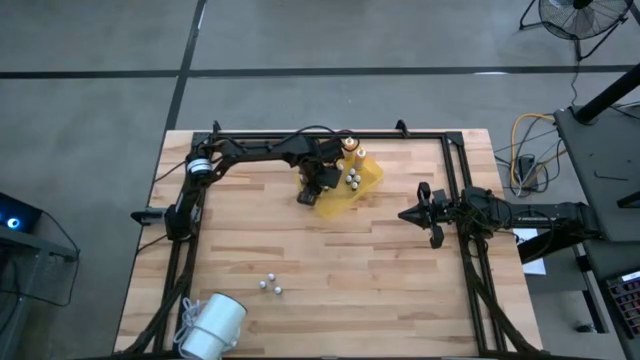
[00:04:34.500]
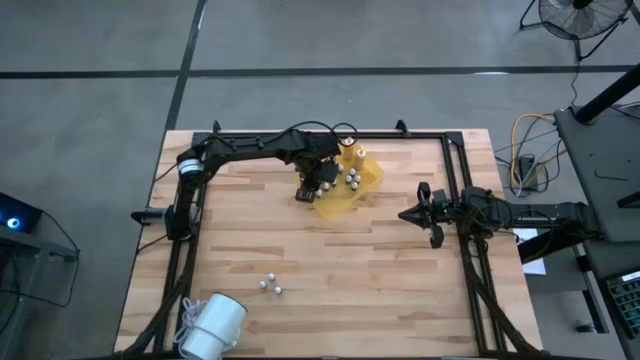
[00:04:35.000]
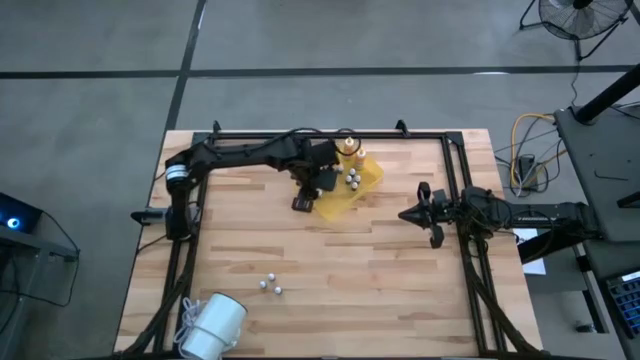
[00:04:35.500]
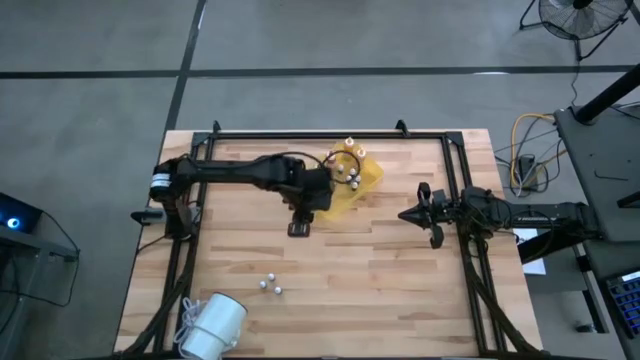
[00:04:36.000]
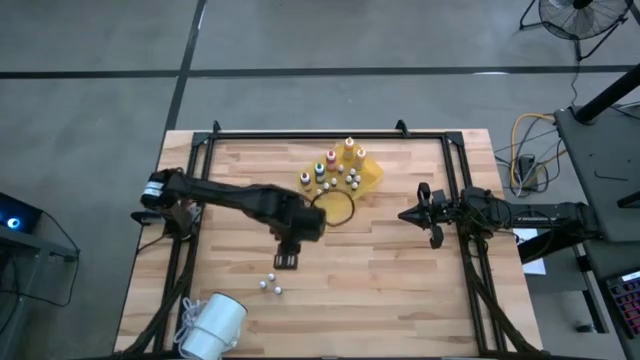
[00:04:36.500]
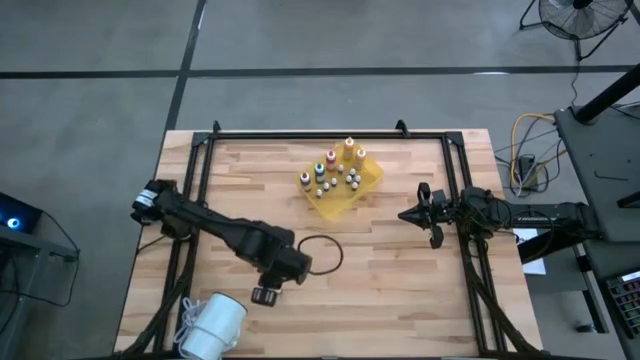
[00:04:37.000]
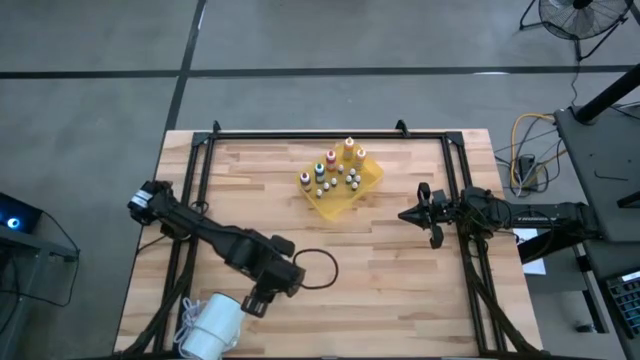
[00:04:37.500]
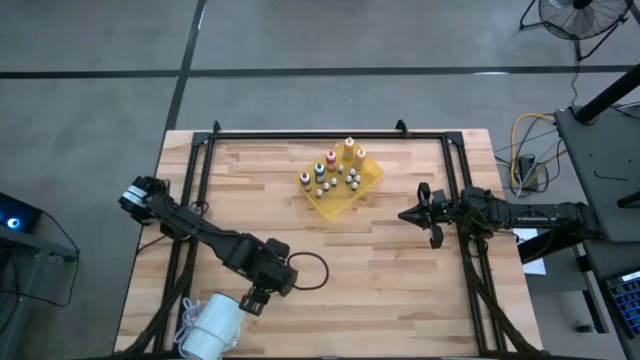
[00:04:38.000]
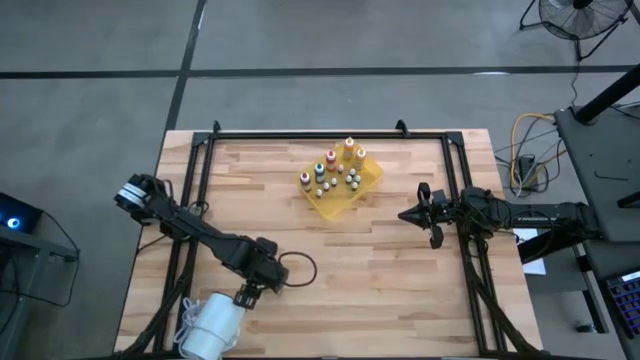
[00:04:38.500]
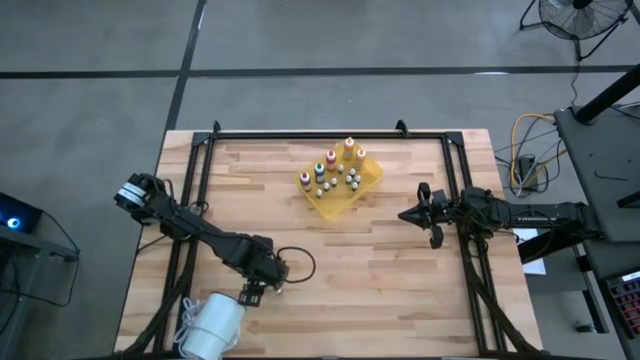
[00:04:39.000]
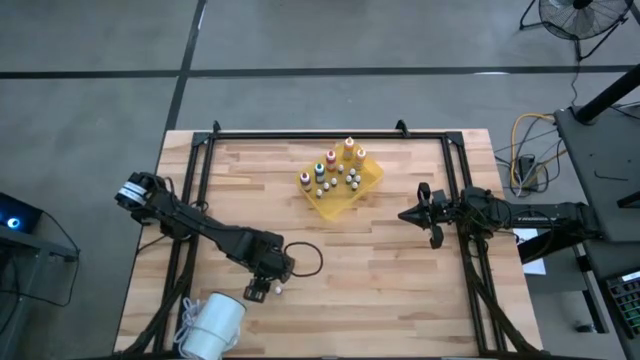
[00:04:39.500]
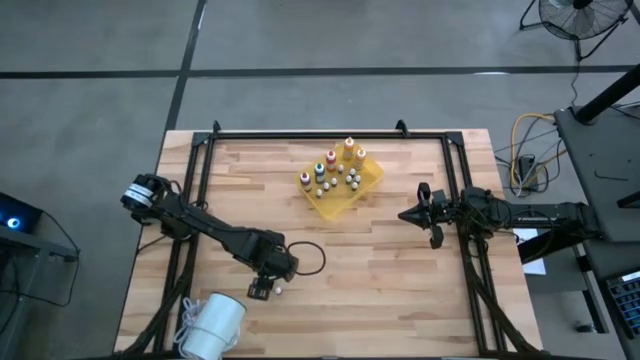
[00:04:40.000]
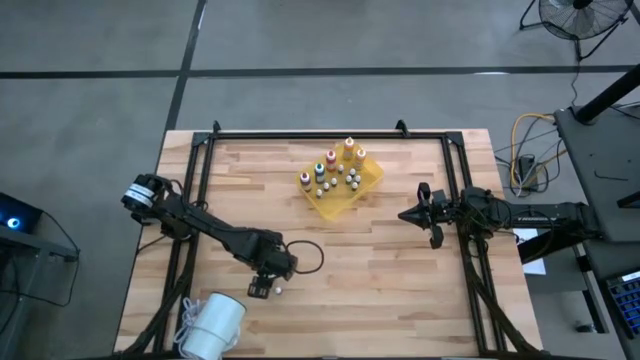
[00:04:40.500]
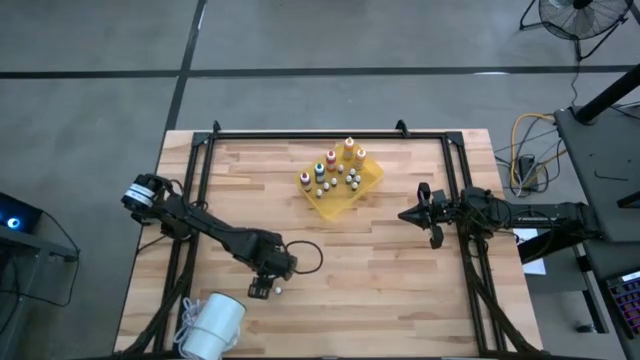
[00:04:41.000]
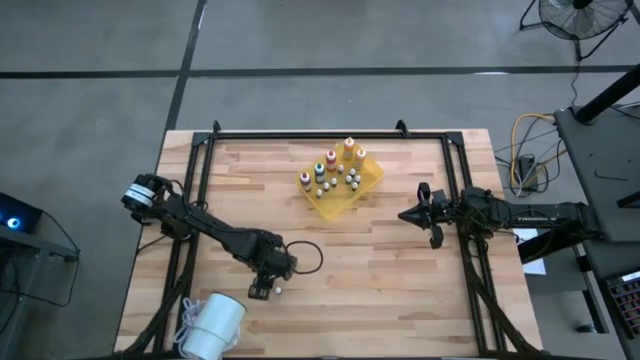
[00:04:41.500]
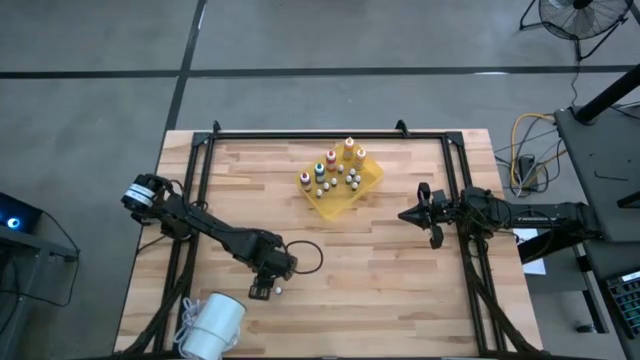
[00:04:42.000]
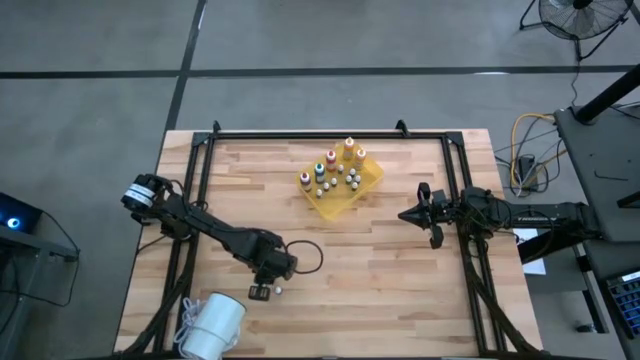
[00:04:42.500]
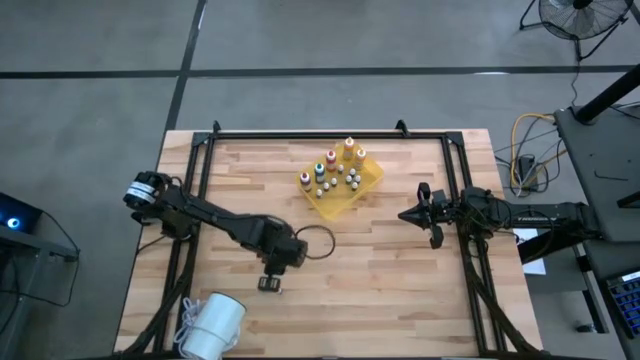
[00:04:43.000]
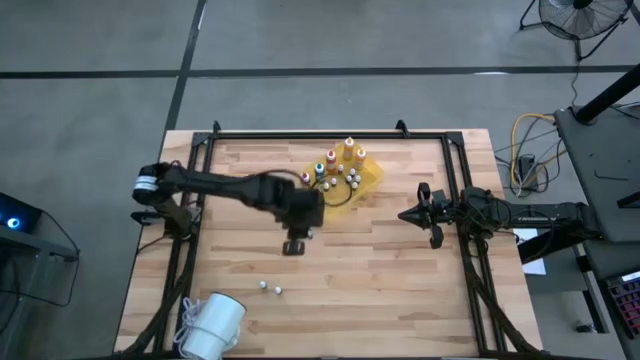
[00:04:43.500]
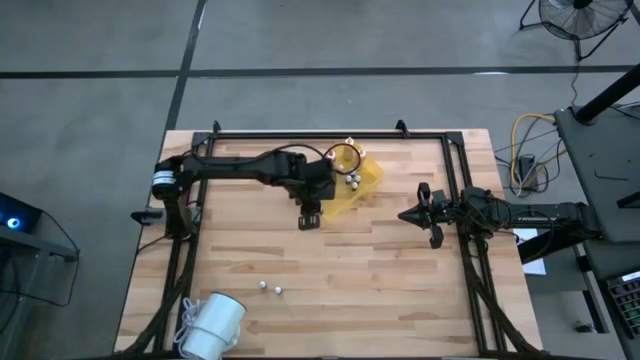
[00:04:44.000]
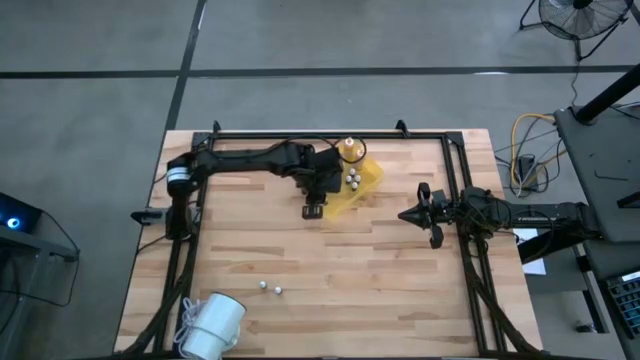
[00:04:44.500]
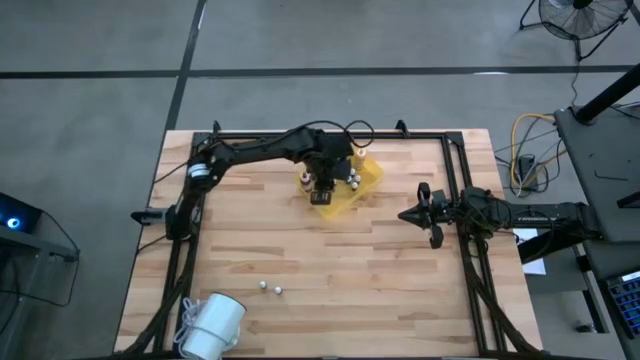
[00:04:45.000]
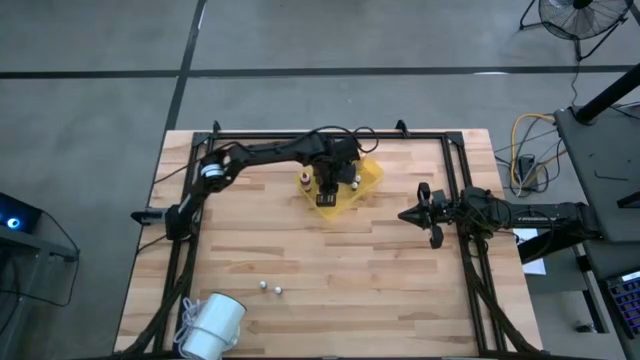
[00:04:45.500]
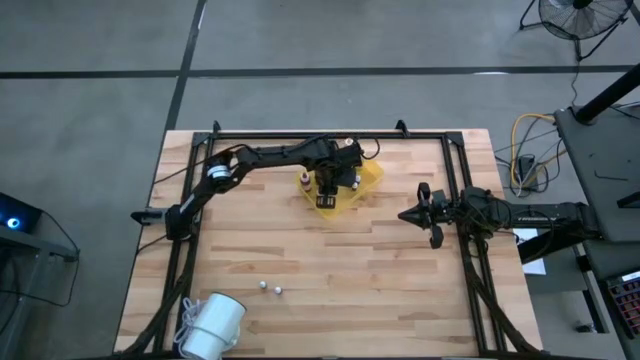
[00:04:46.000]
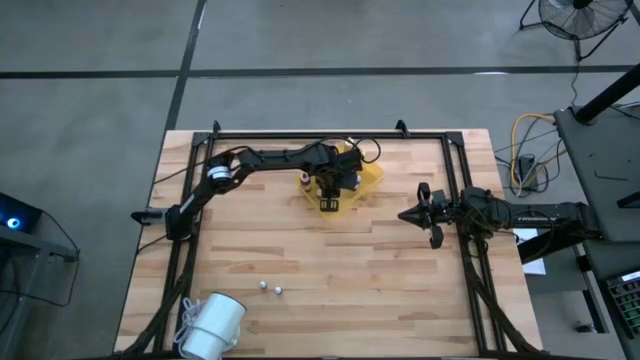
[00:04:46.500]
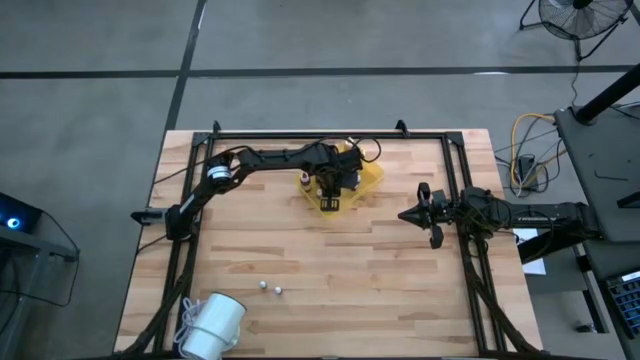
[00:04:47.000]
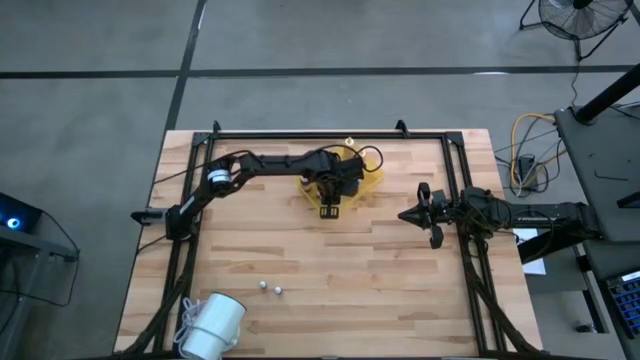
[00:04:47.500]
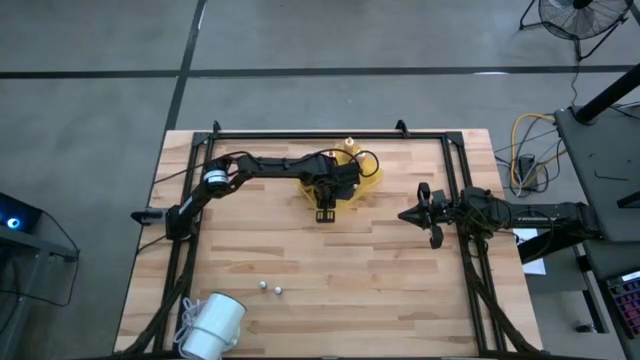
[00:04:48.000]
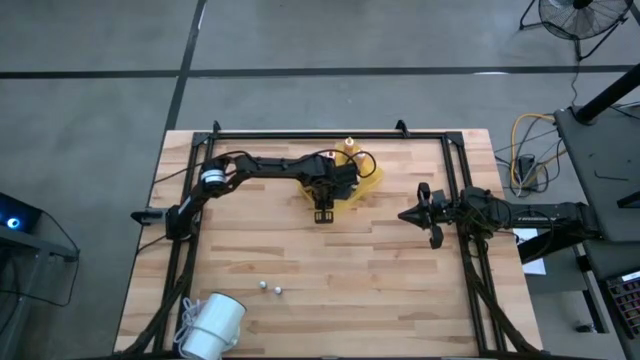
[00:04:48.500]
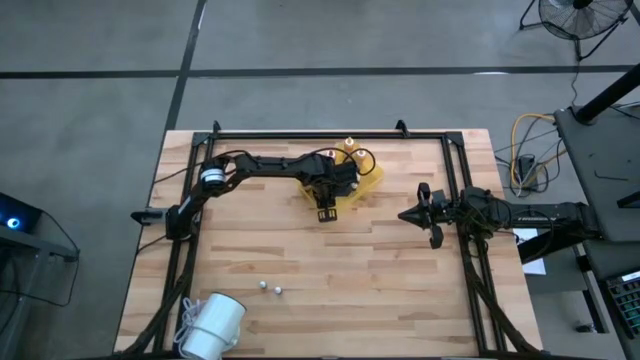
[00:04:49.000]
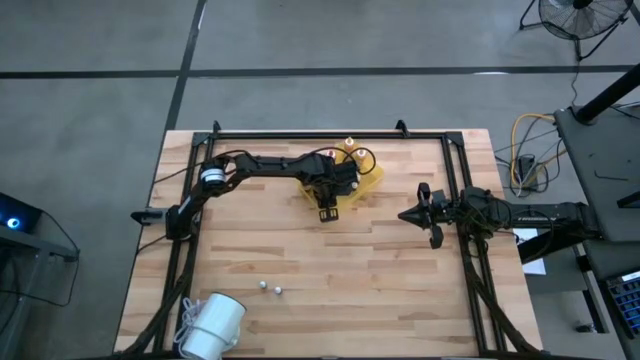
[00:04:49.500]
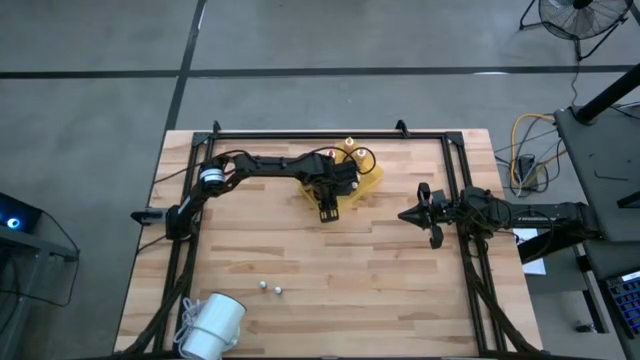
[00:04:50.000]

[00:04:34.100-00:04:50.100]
Task: Pick & Place food coloring
Put the small blue food coloring bottle into the yellow bin
